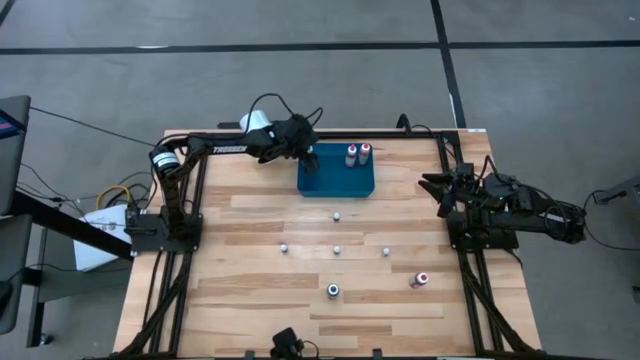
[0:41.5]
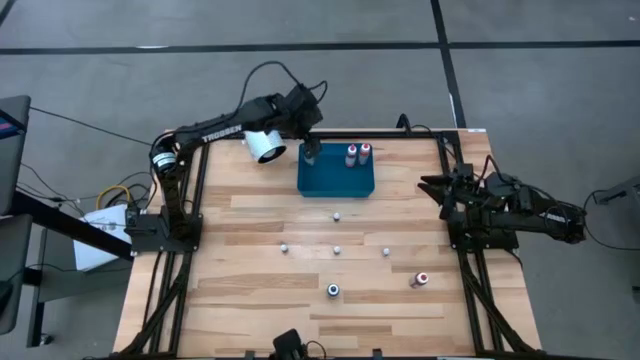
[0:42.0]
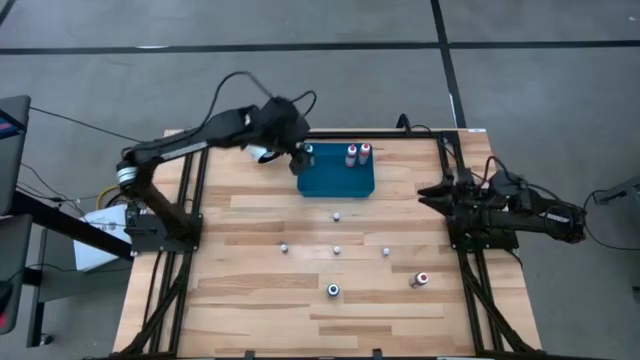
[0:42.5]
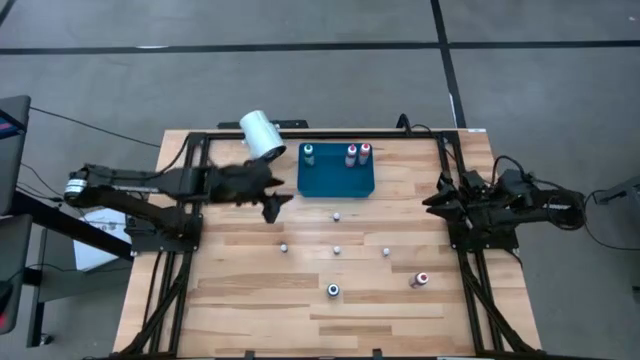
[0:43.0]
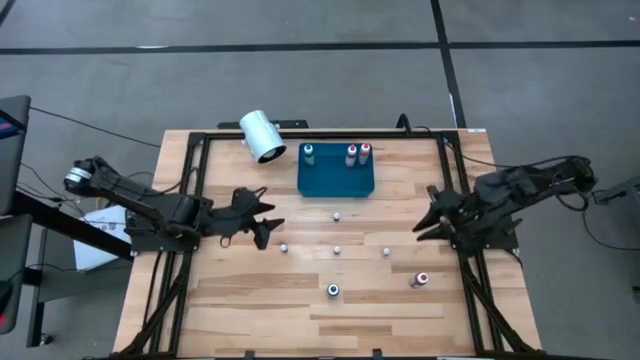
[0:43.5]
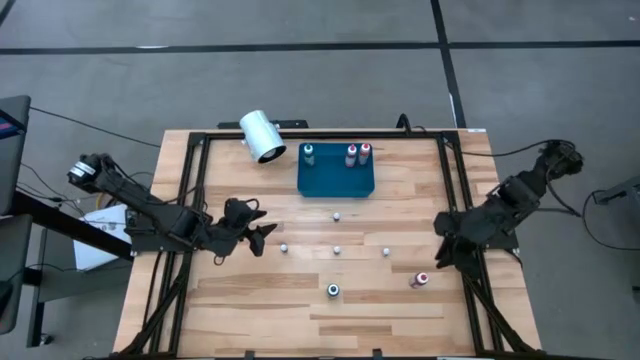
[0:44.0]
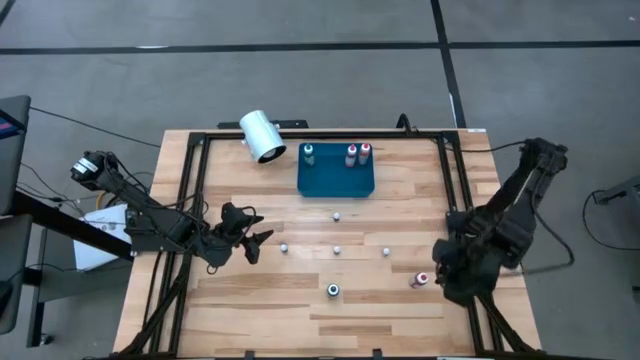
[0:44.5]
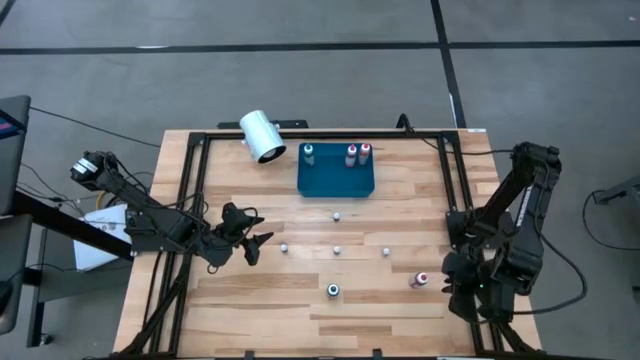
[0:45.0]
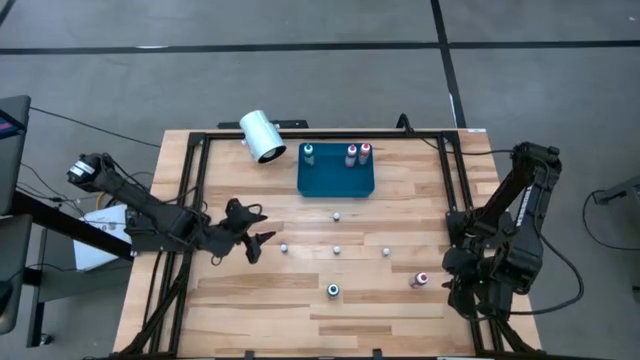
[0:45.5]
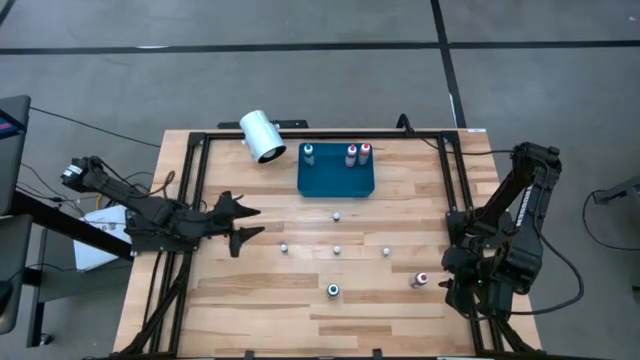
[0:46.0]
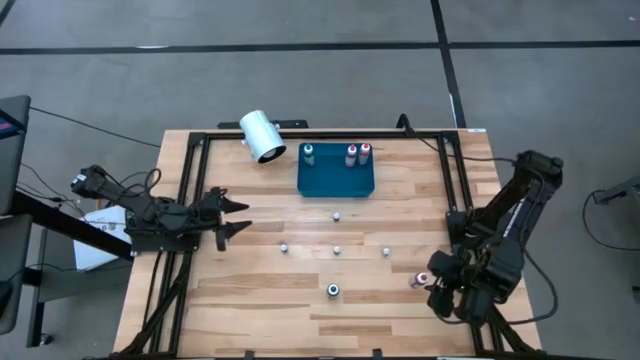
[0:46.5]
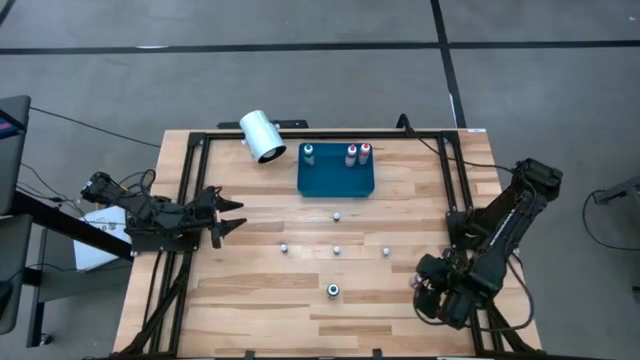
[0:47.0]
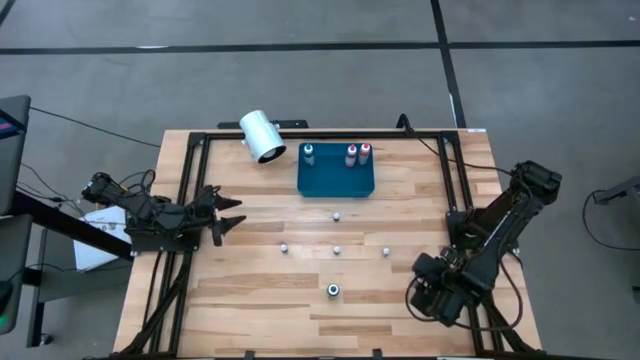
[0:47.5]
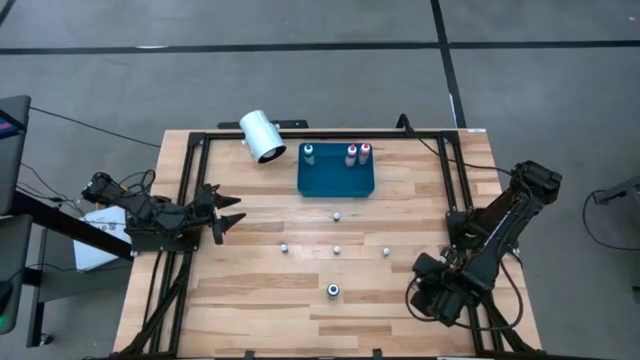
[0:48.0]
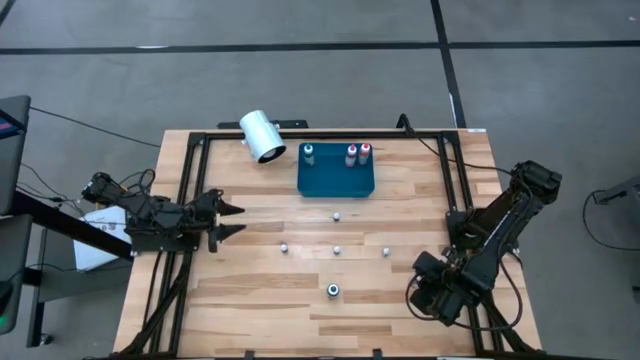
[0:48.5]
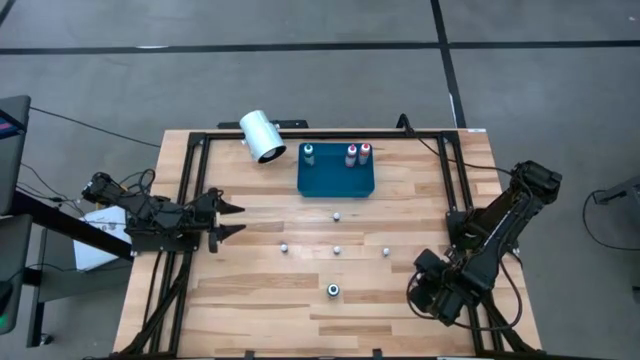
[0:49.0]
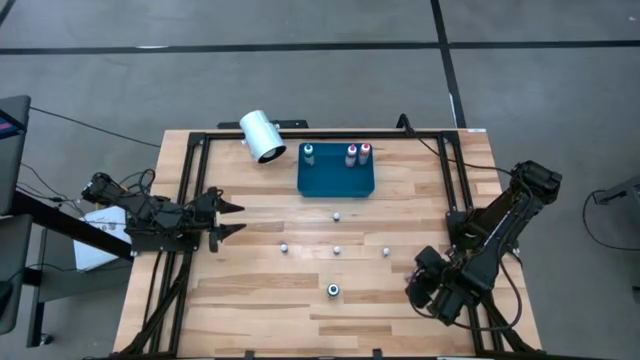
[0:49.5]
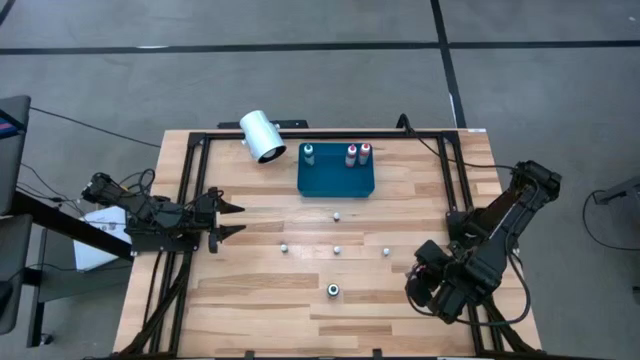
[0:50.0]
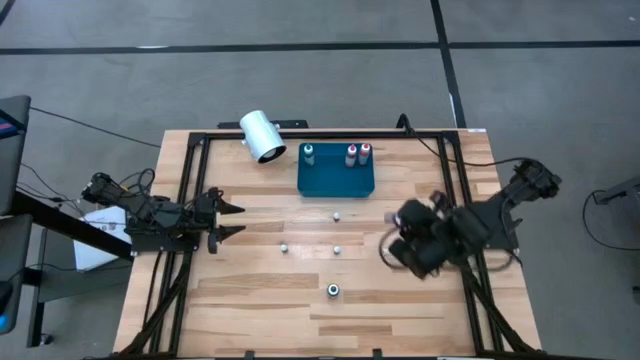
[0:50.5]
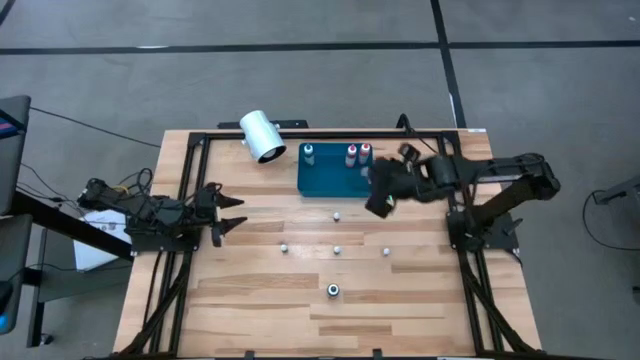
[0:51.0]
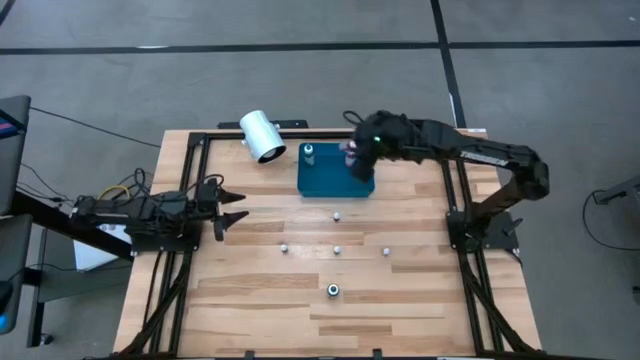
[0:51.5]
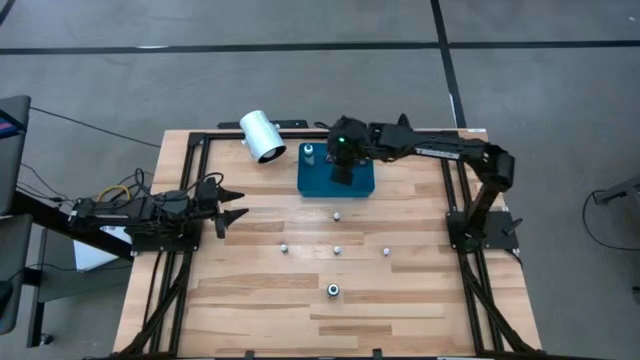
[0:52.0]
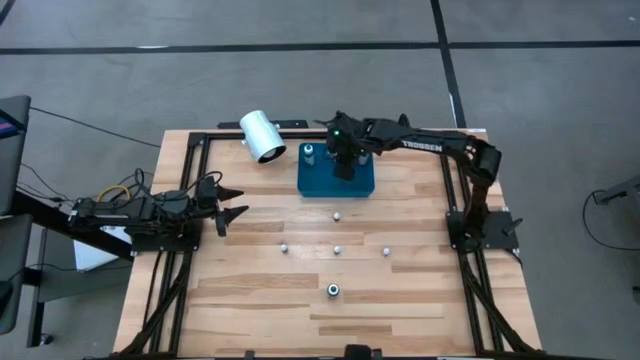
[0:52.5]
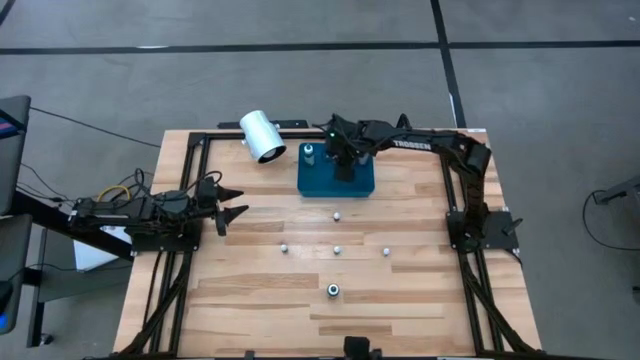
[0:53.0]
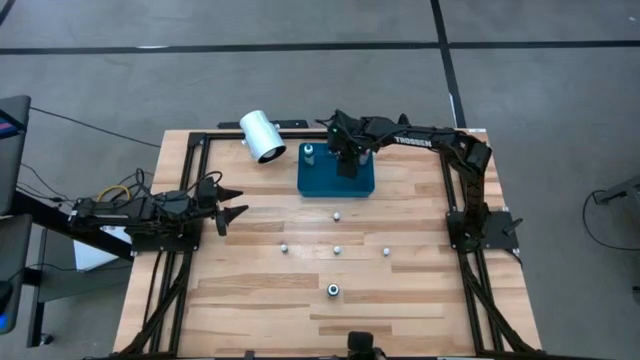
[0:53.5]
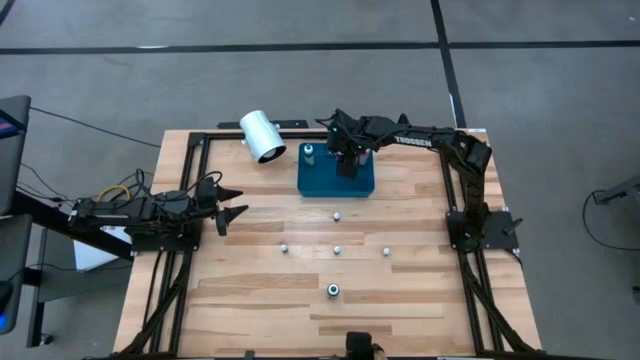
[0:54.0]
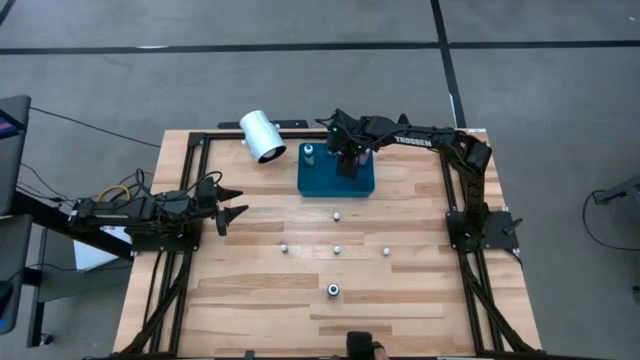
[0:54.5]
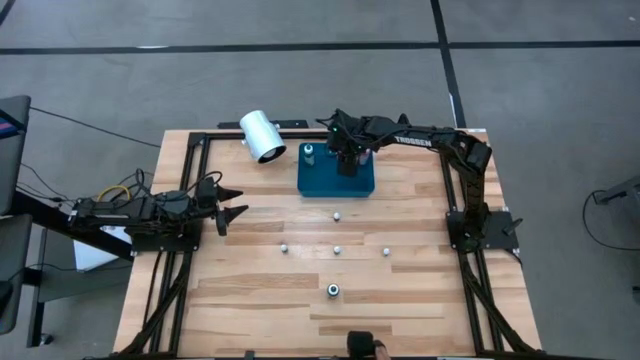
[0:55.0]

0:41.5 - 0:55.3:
Task: Pick & Place food coloring
Put the large red and orange food coloring bottle into the blue bin

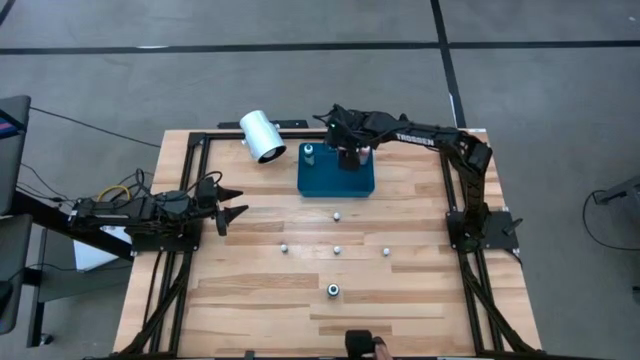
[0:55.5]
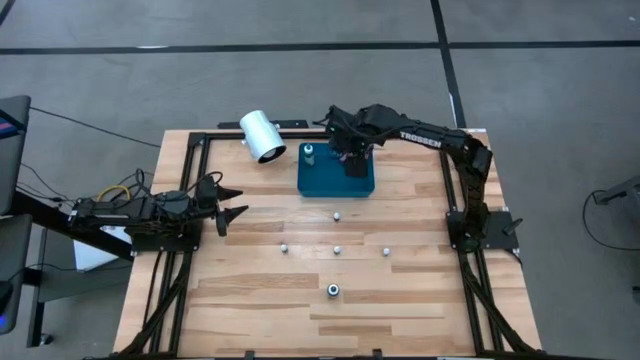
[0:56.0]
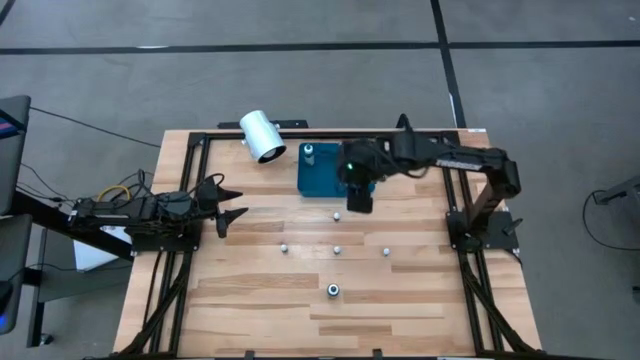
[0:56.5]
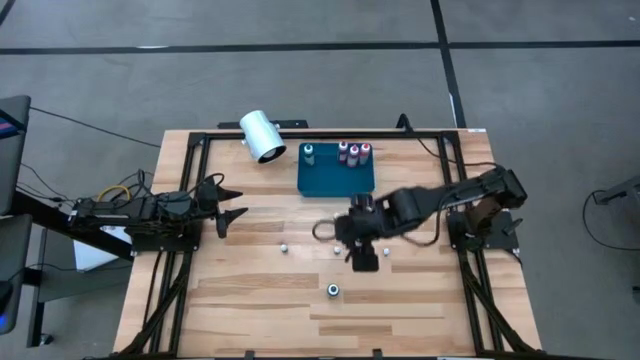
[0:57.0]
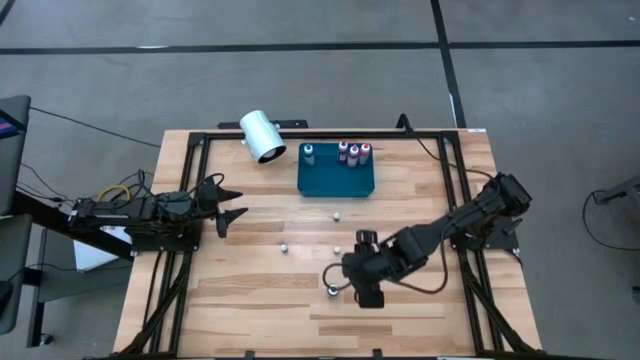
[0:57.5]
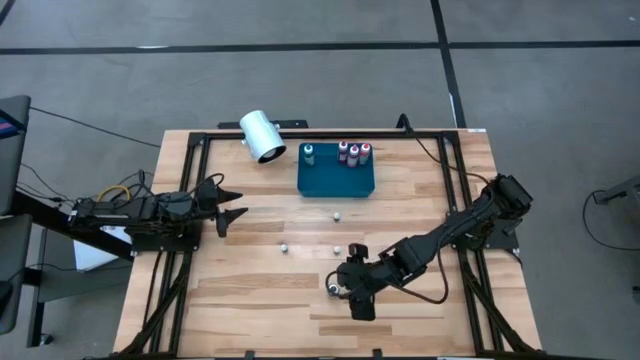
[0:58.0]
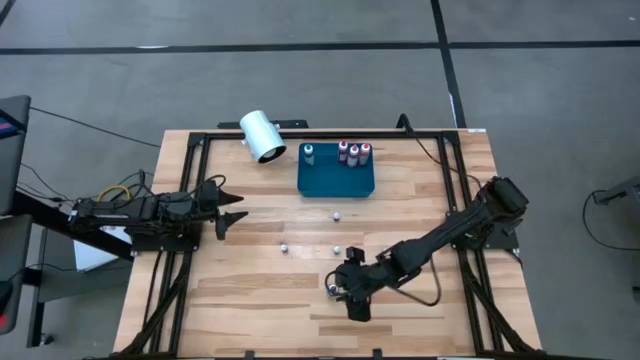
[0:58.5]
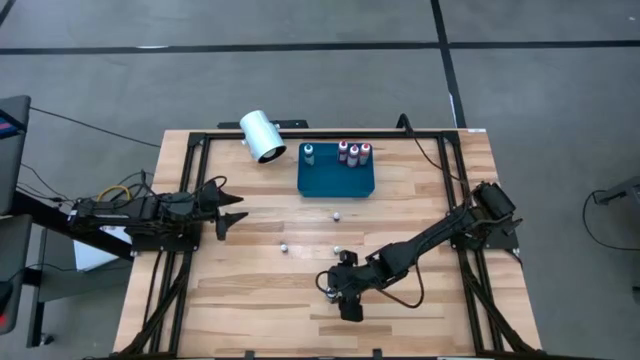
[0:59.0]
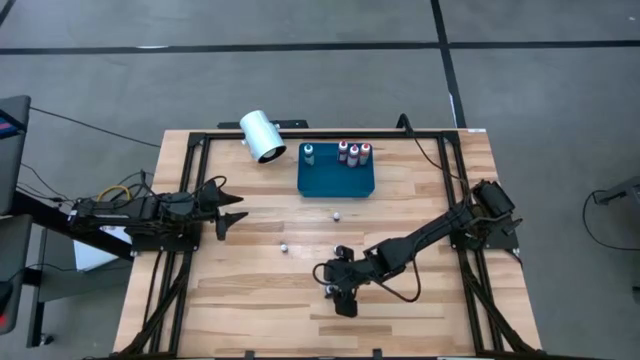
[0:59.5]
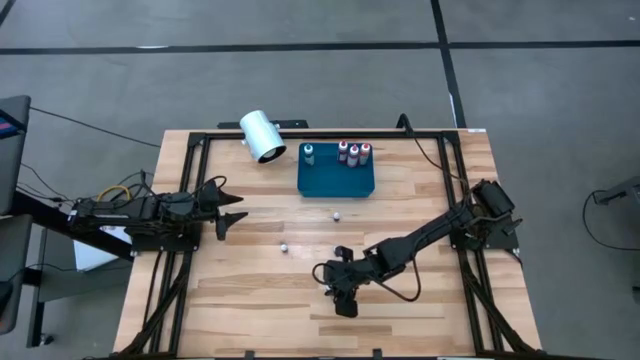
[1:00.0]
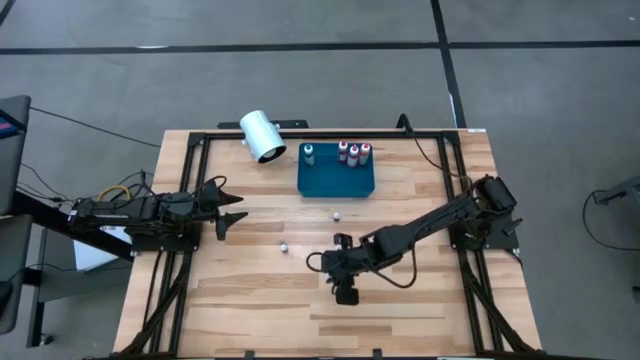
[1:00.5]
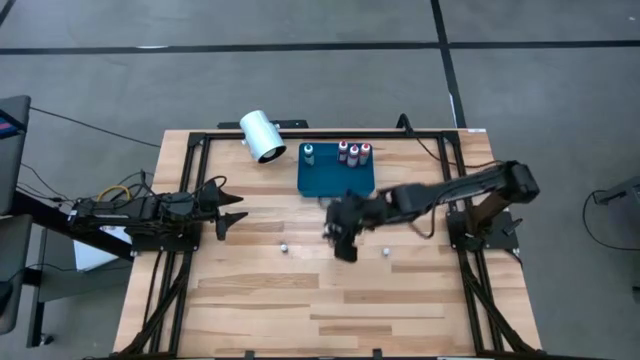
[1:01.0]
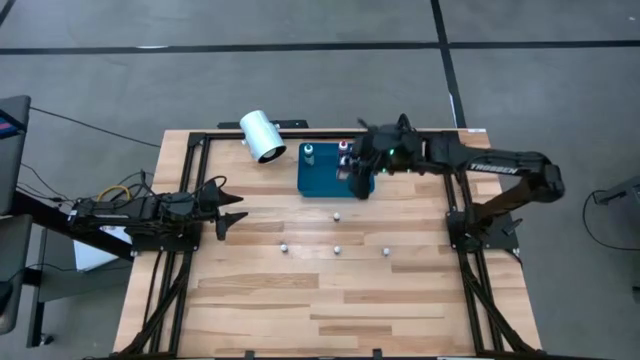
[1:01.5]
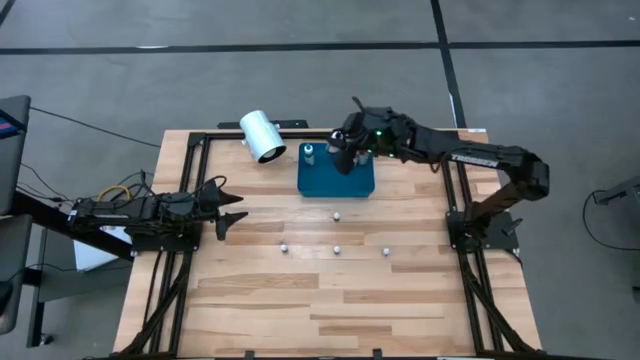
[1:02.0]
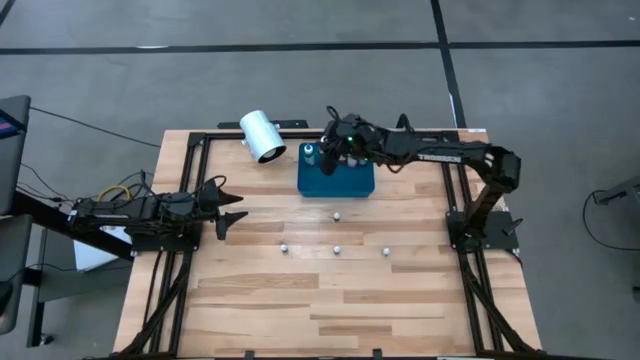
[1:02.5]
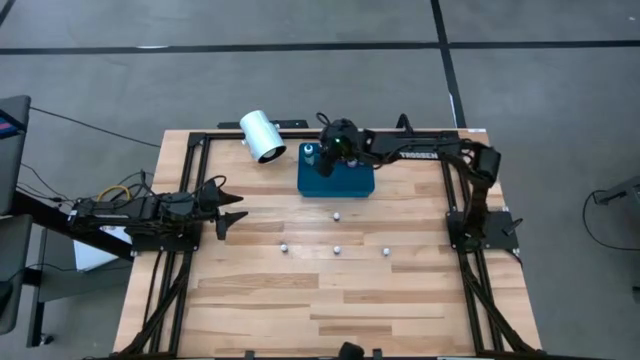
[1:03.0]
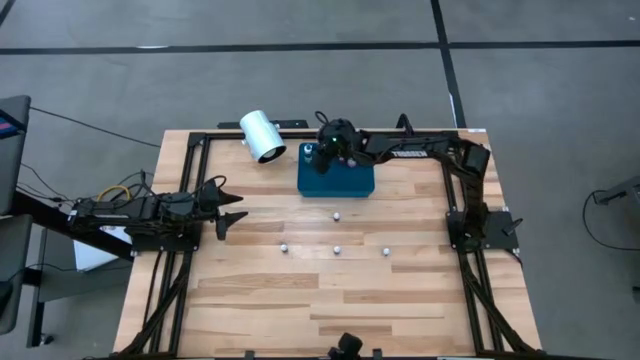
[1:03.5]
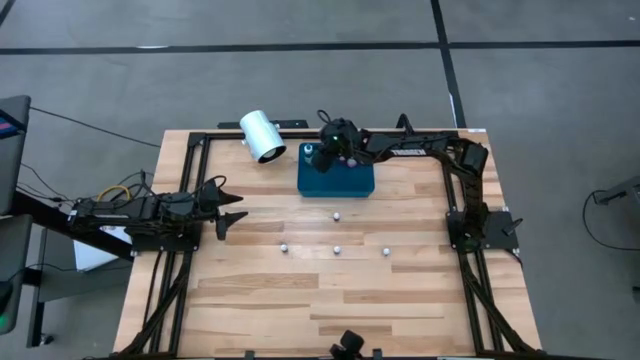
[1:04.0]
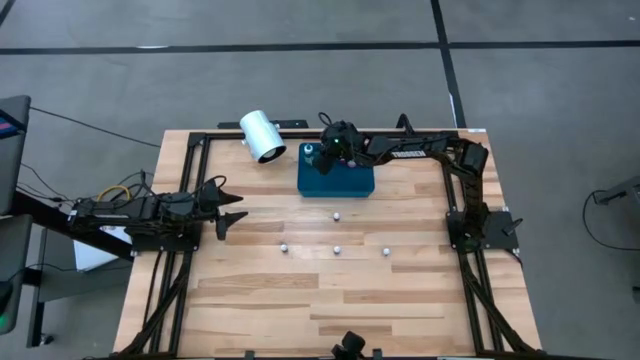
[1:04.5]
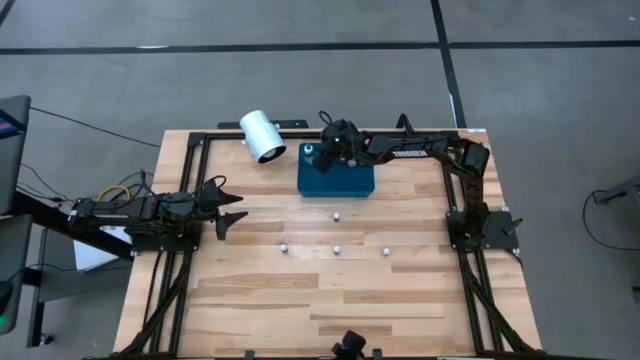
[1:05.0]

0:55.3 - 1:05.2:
Put the large black food coloring bottle into the blue bin
